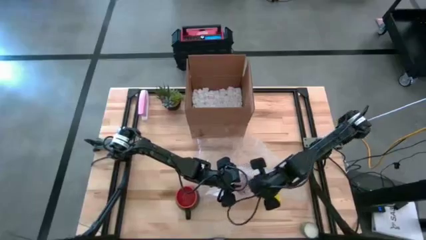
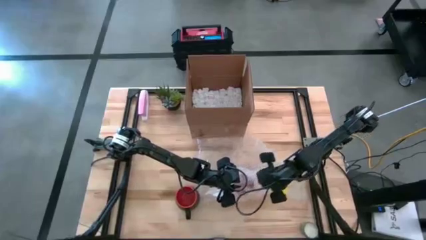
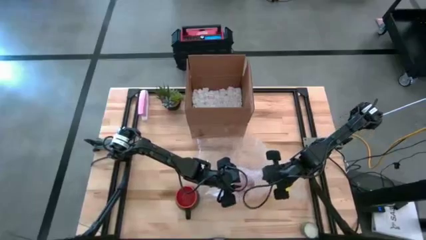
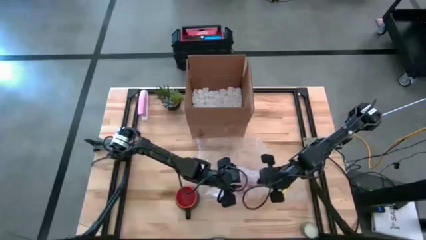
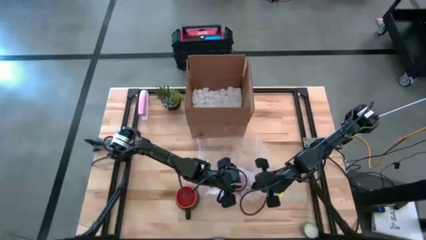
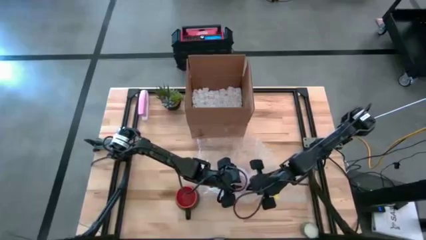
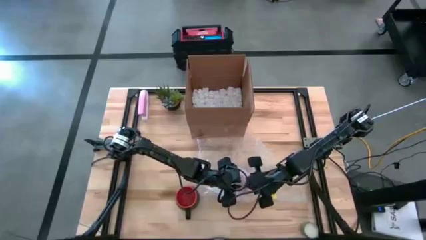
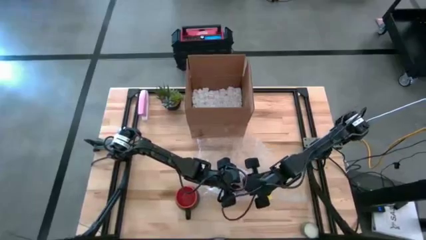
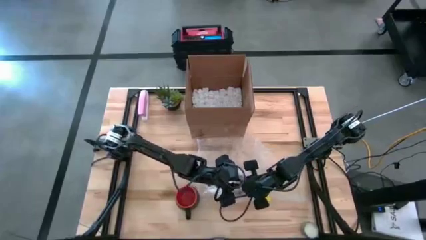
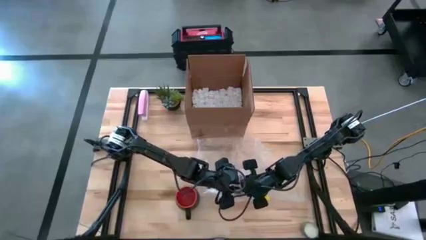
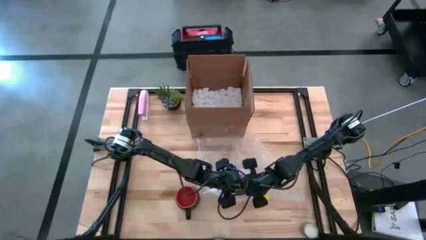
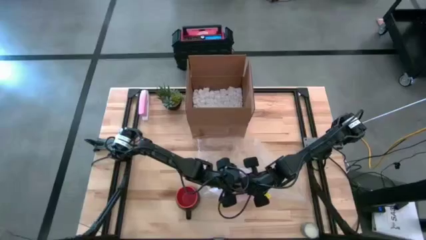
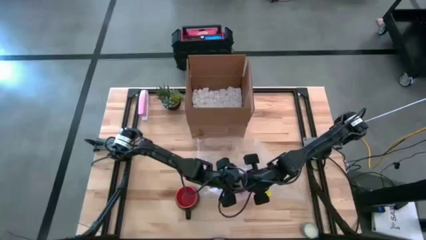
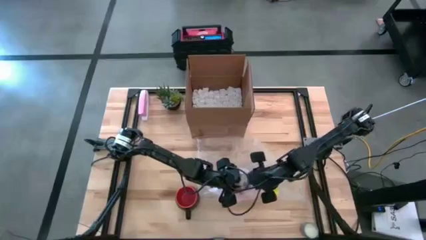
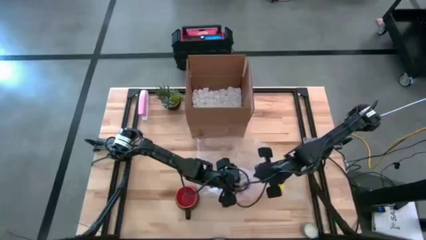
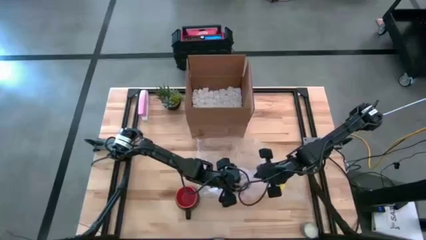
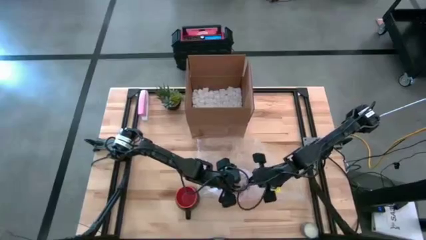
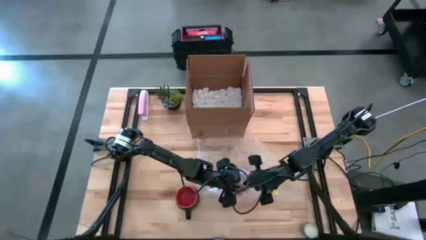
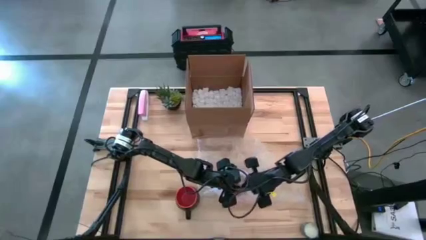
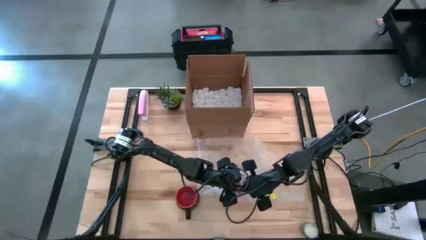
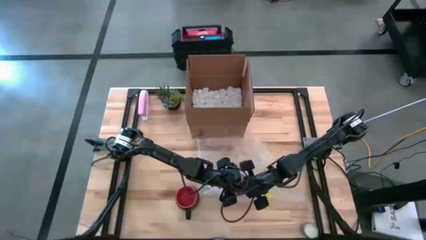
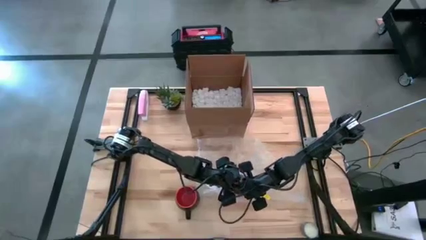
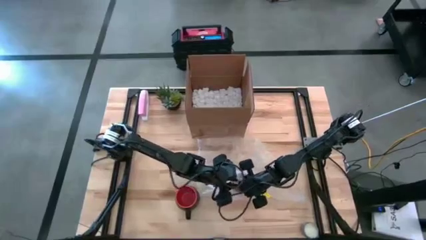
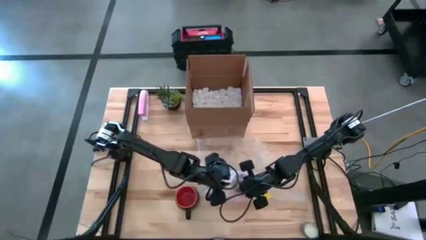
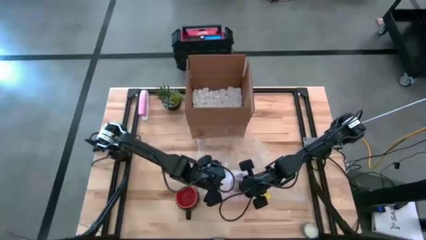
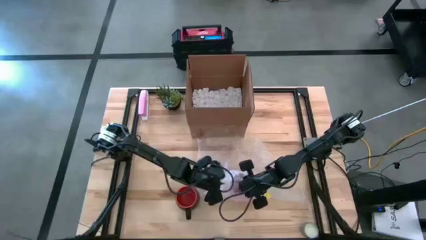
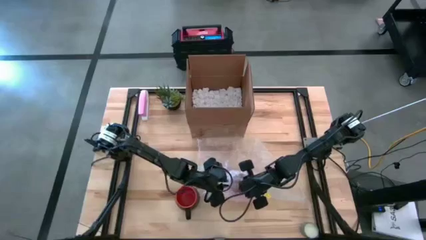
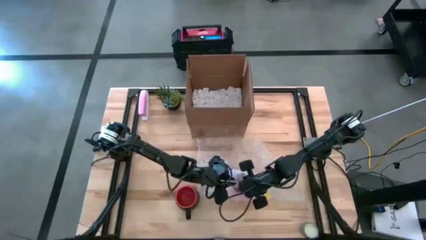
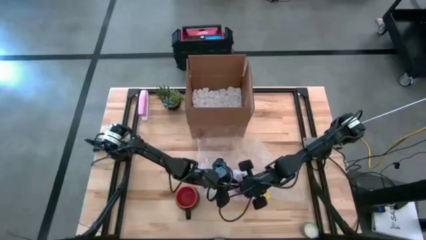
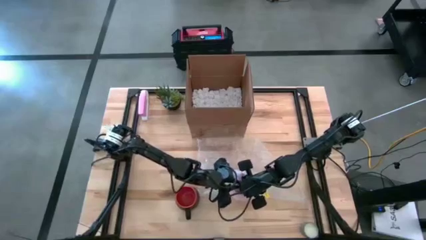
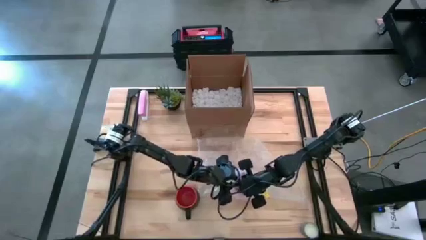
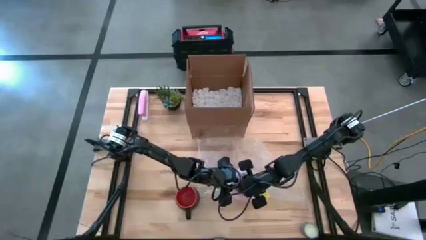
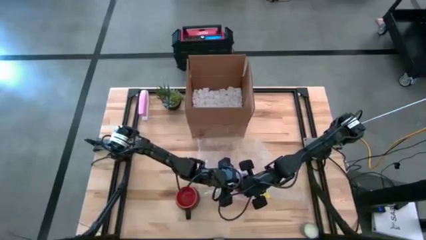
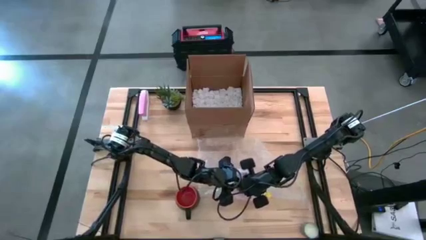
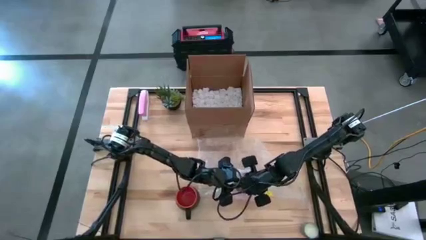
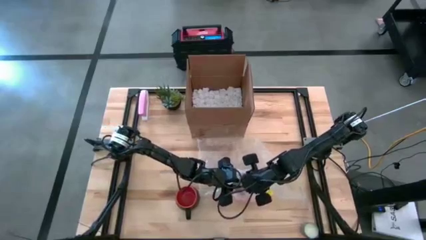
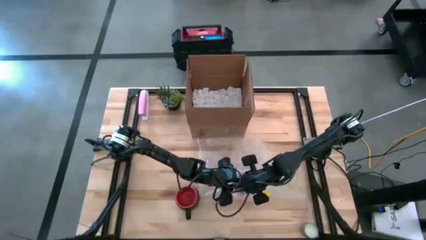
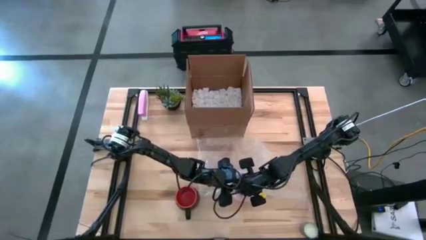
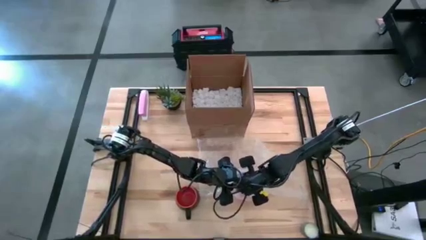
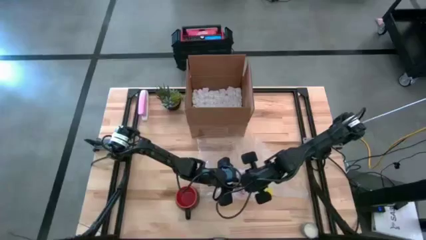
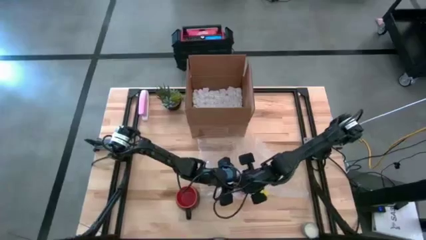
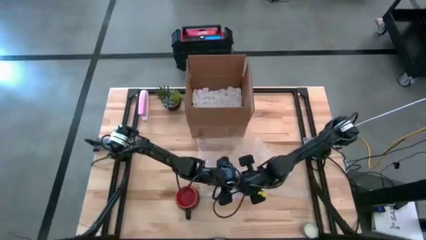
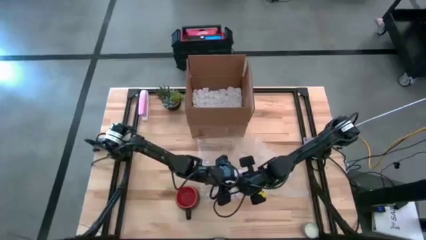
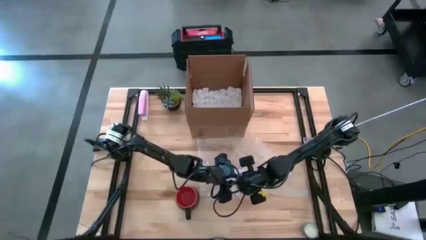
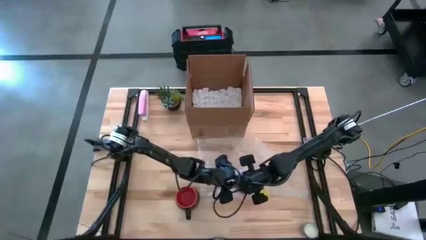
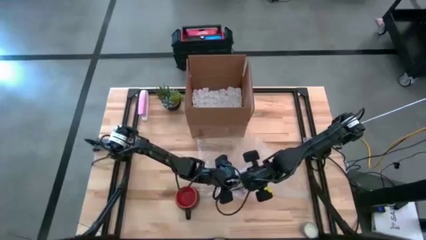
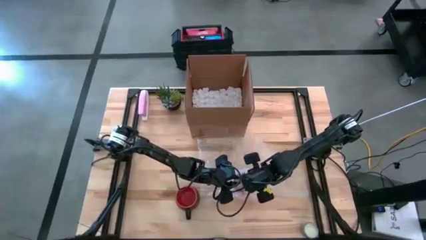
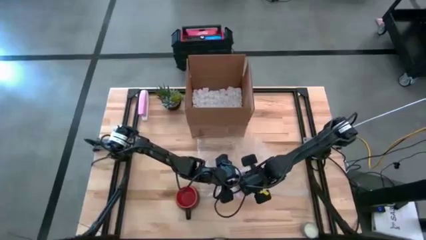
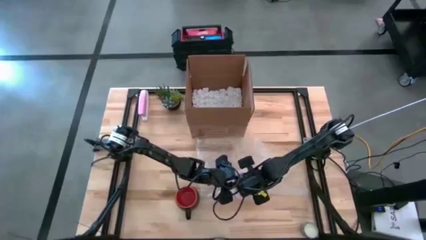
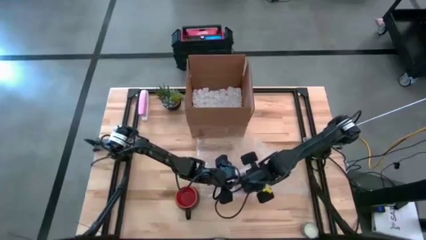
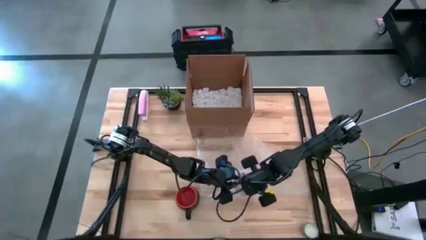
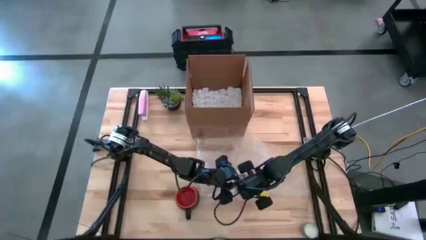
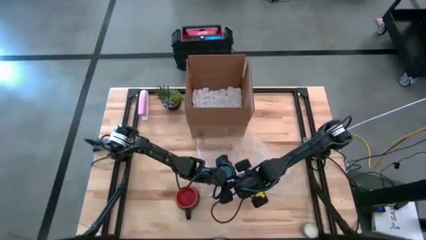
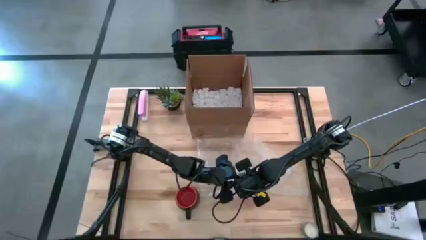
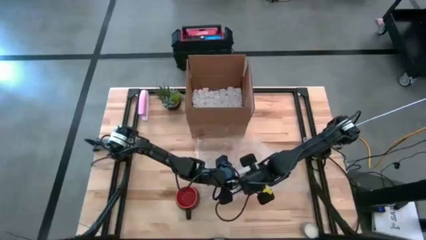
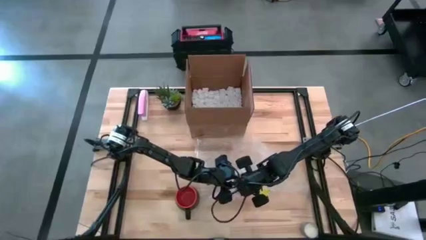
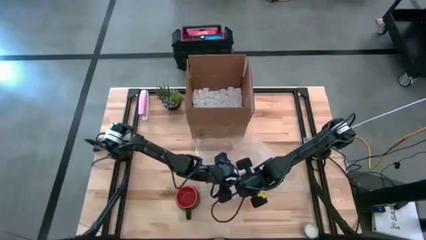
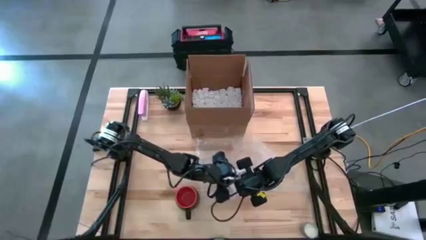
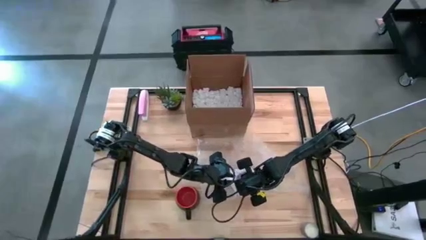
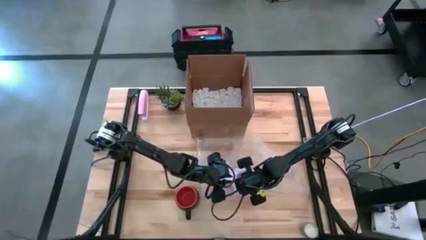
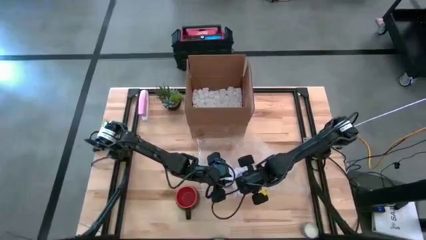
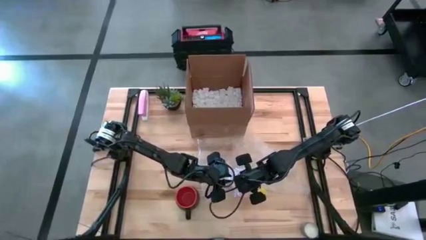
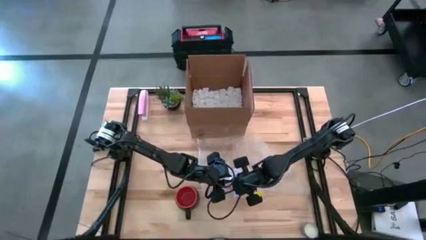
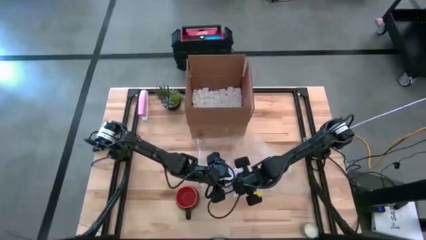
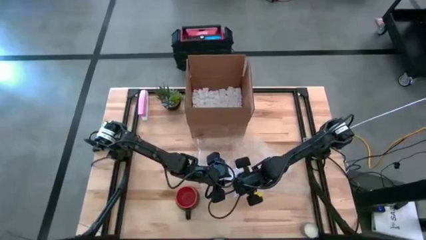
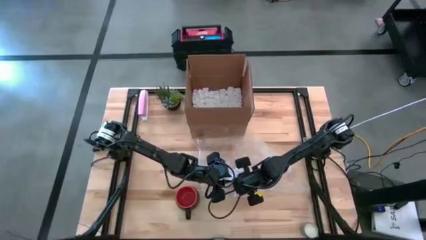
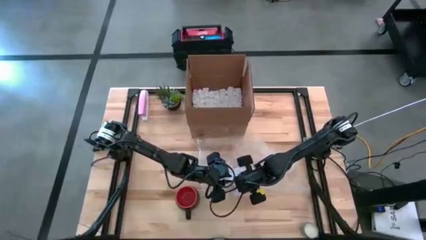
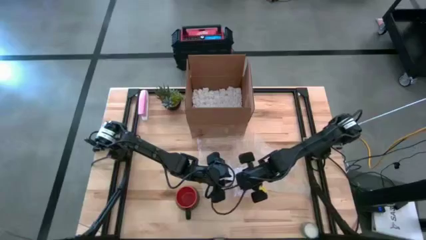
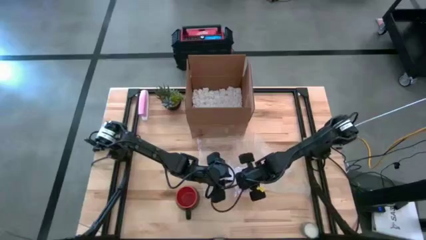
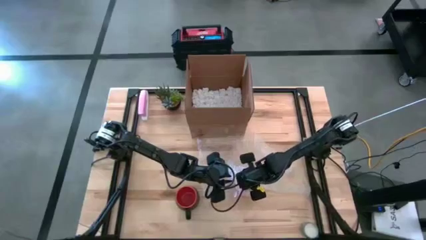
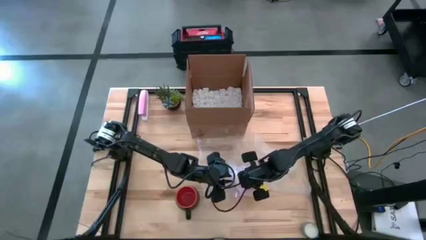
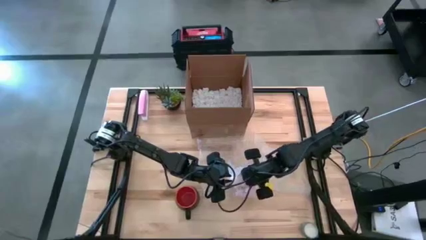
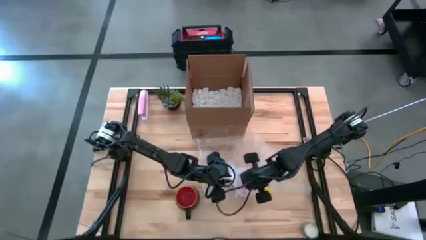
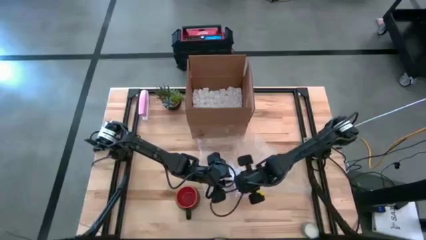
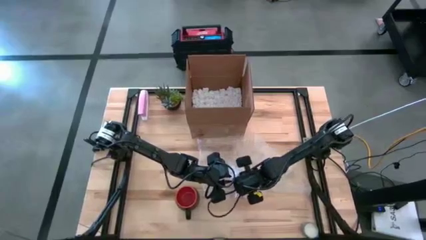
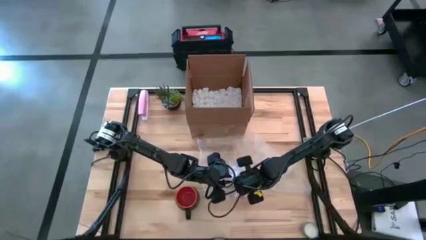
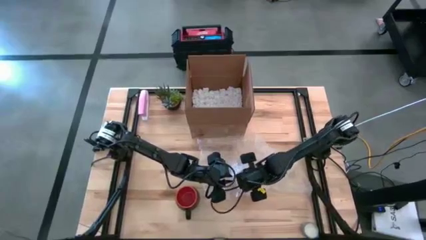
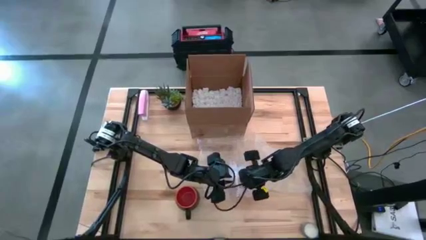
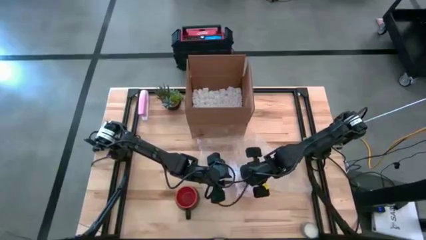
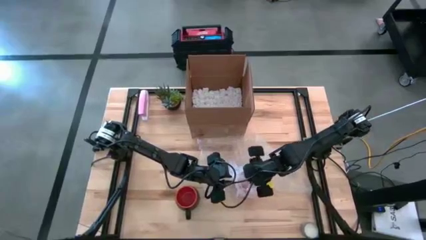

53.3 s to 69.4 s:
Task: wrap mug
Wrap the orange mug with the bubble wrap on top
